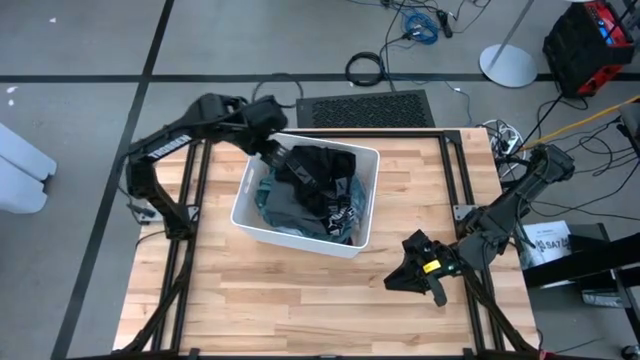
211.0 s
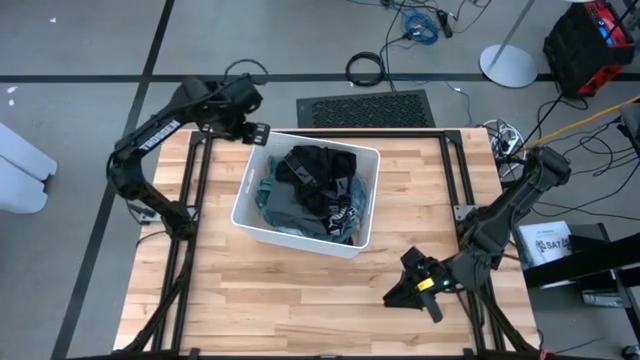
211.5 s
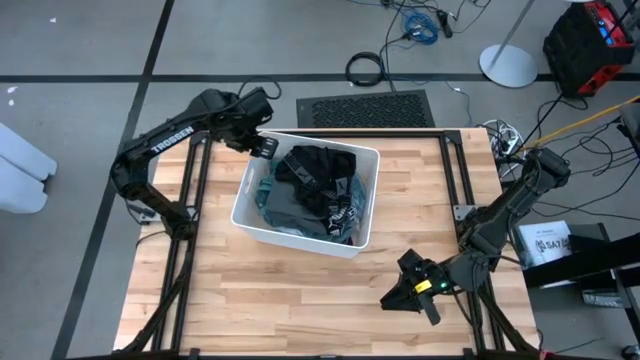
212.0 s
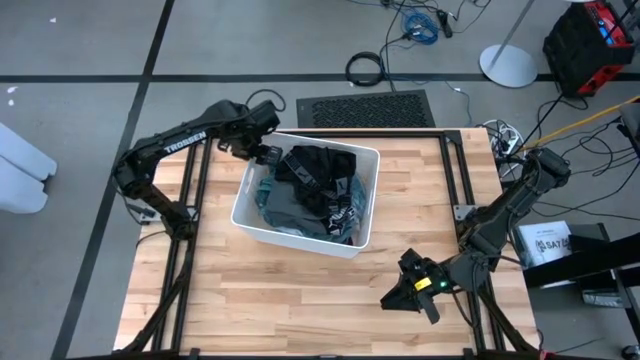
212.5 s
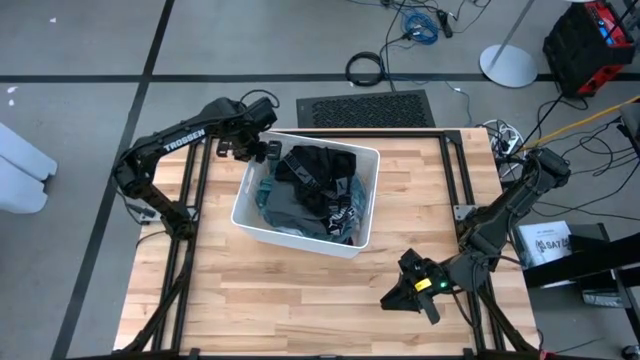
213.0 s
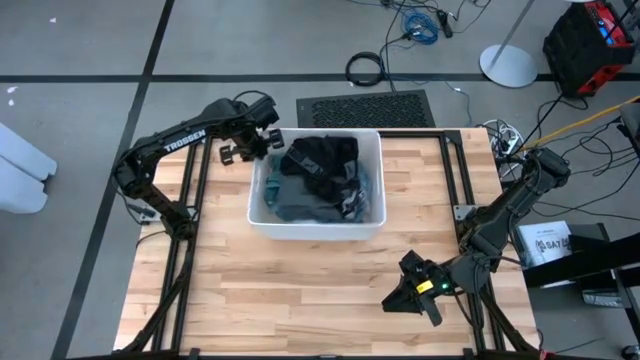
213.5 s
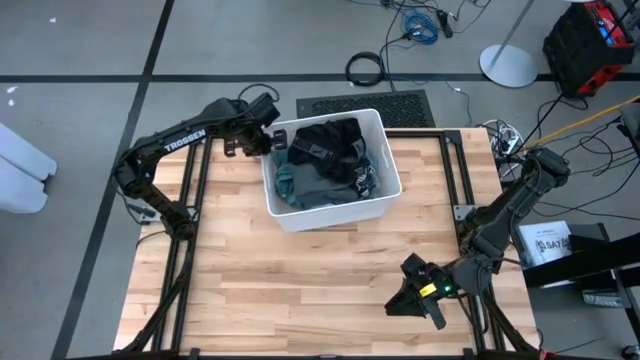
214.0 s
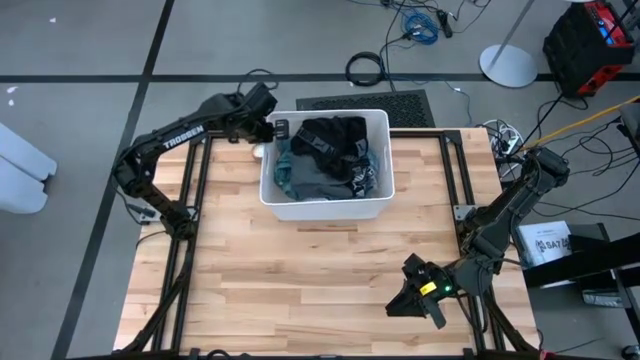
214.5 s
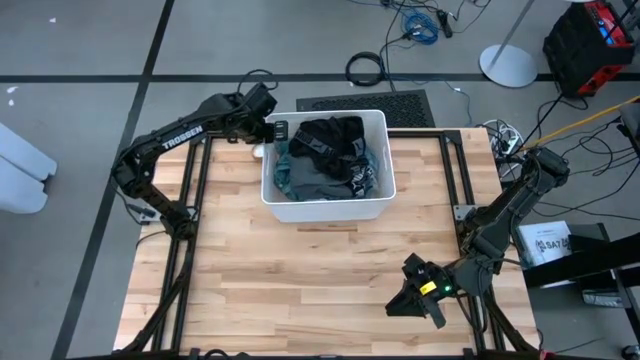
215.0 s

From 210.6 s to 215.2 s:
Task: Sort clothes
Adjust the white laundry bin

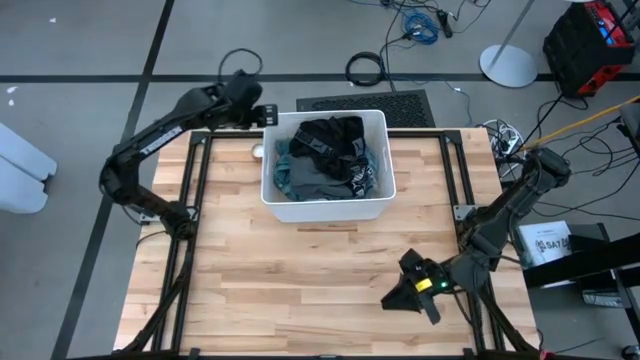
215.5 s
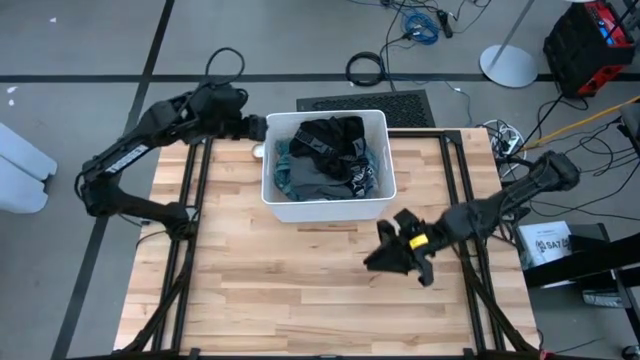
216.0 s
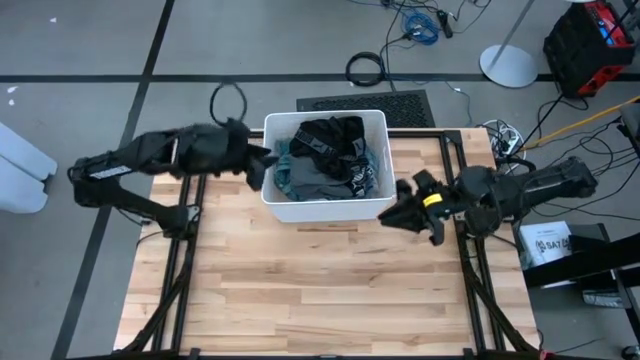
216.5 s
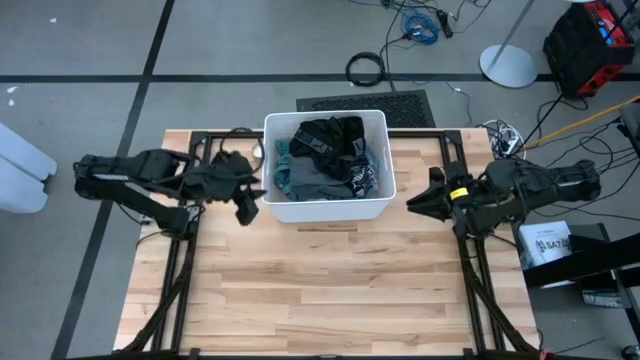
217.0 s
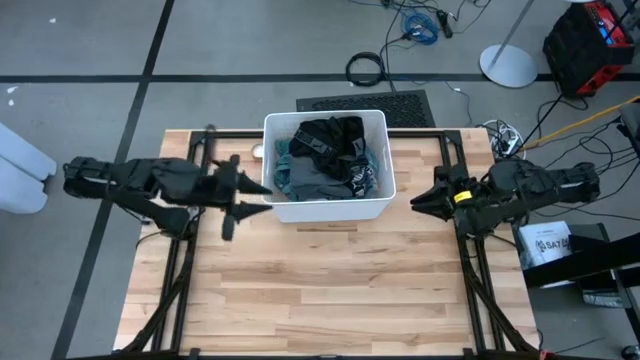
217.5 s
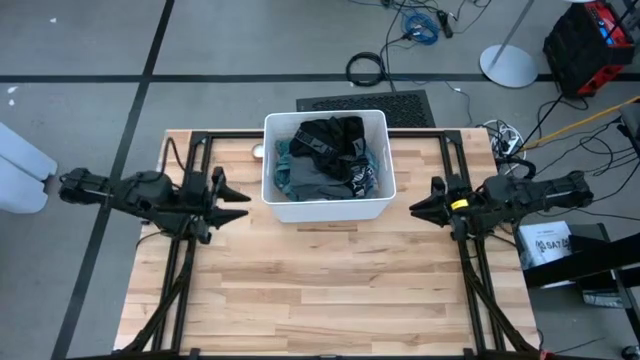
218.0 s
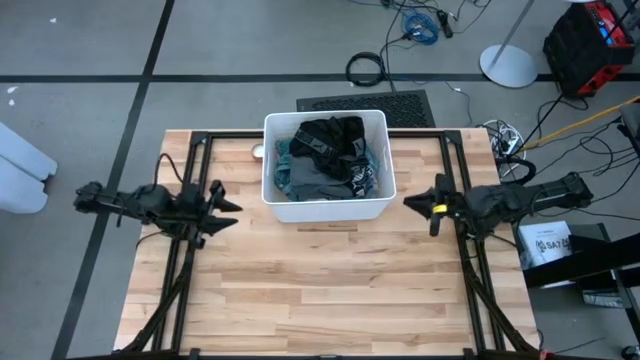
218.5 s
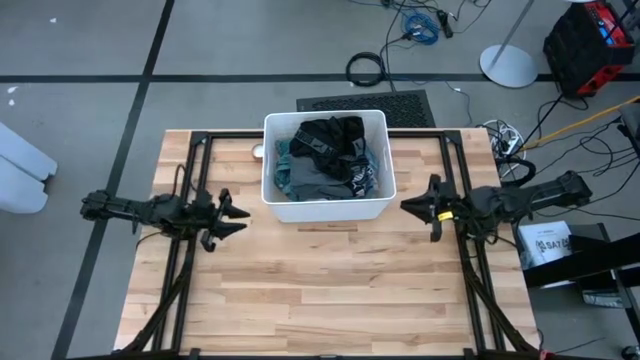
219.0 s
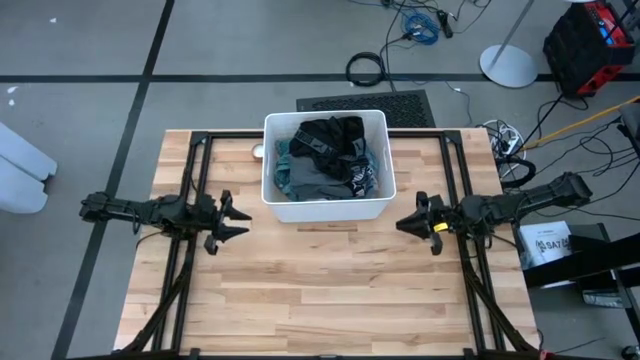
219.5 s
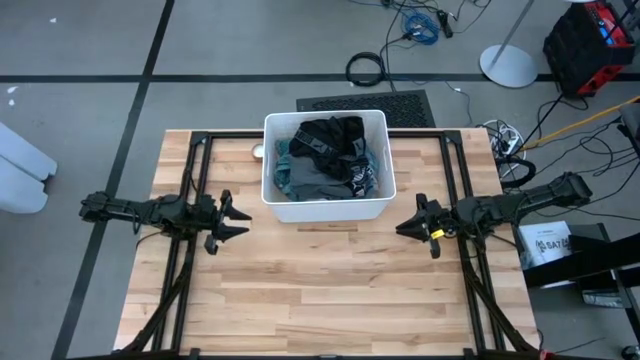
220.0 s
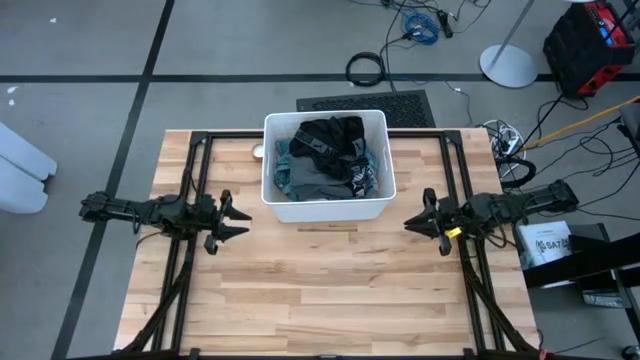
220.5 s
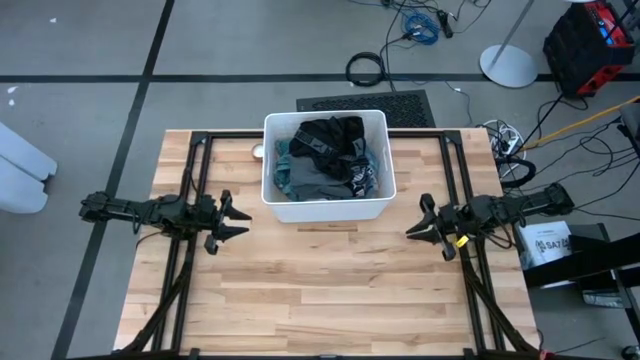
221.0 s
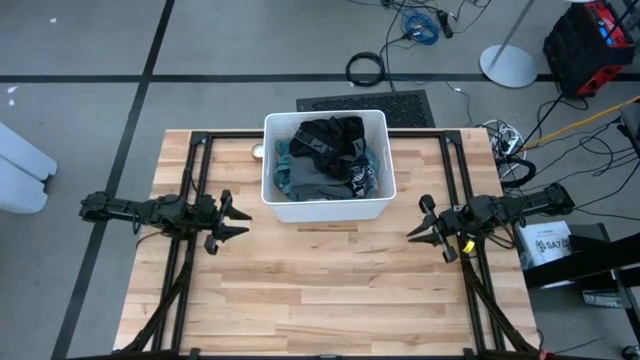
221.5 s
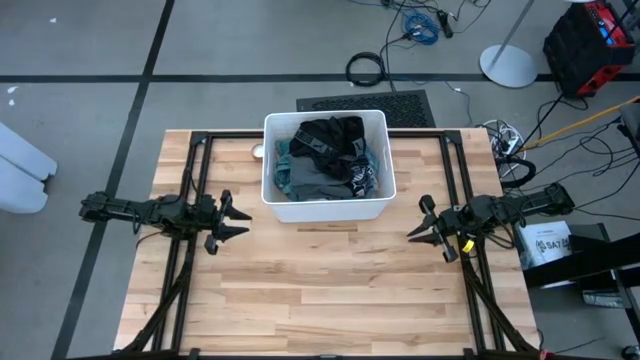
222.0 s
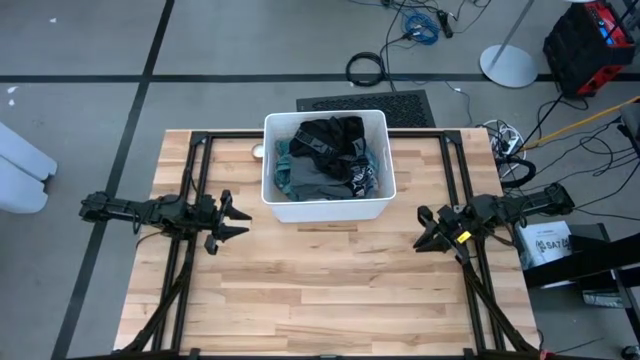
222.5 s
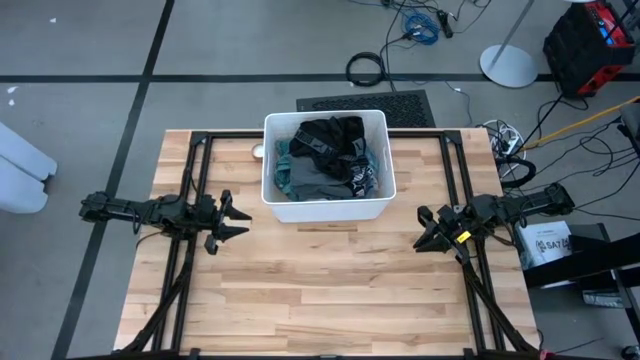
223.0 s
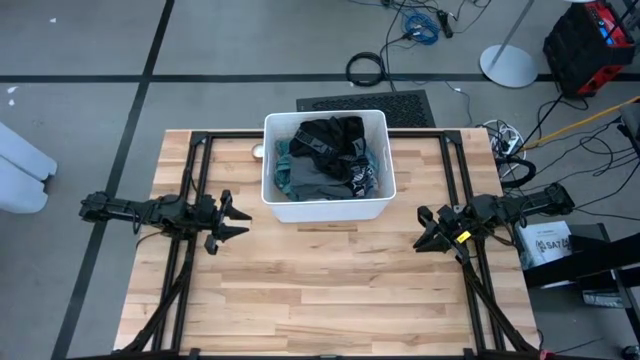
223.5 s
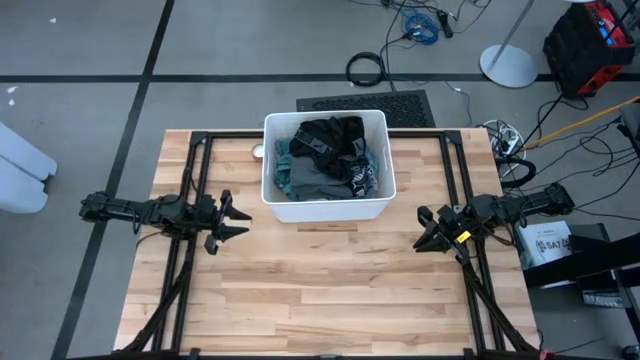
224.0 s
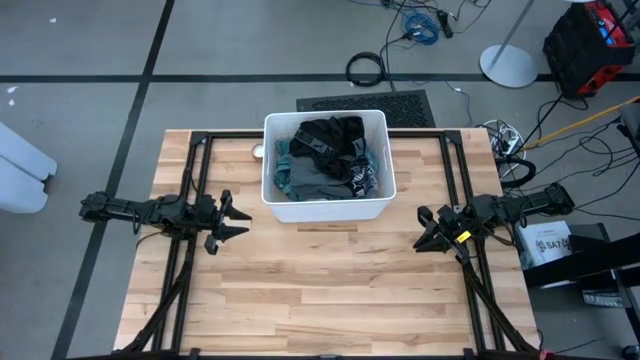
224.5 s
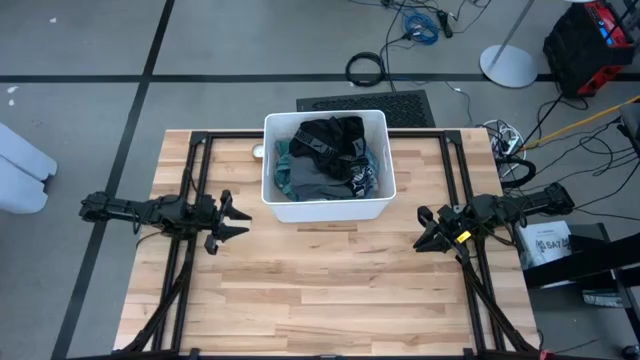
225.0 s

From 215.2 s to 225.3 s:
Return to Home Position

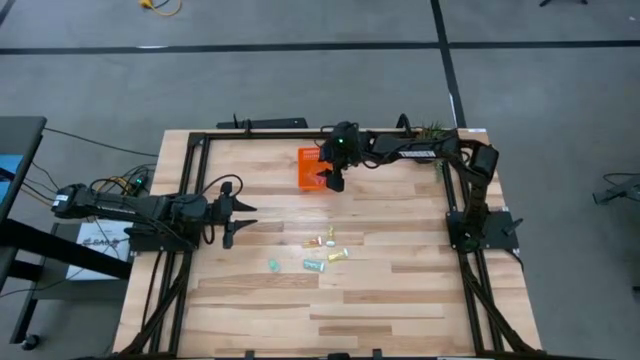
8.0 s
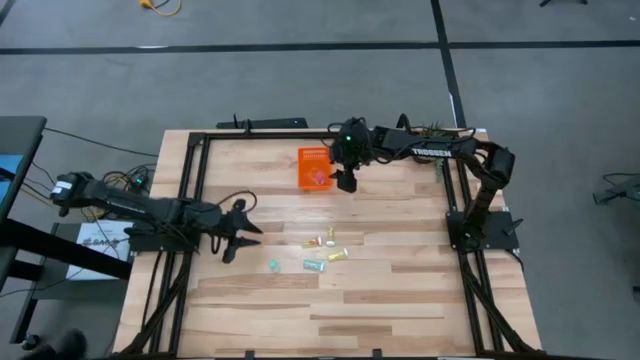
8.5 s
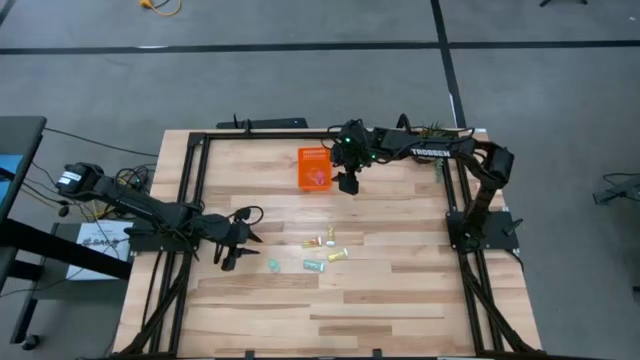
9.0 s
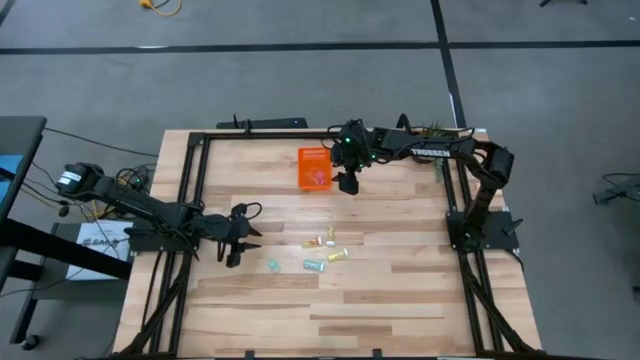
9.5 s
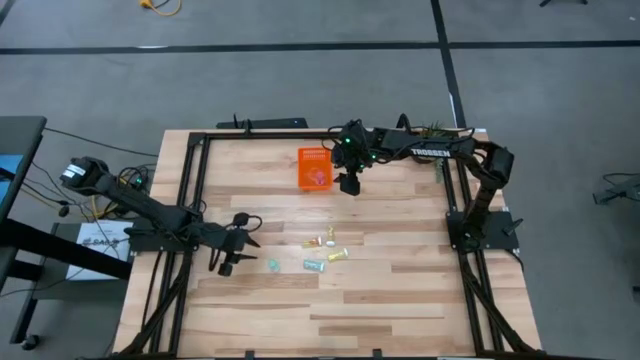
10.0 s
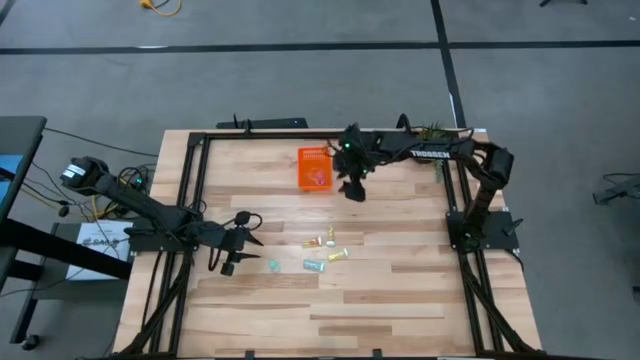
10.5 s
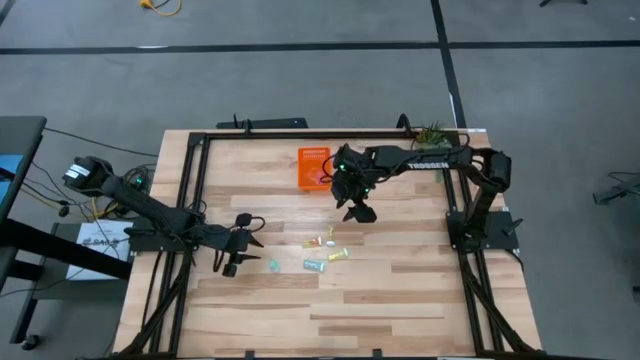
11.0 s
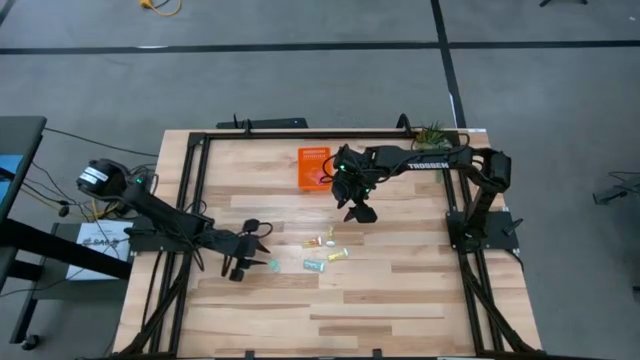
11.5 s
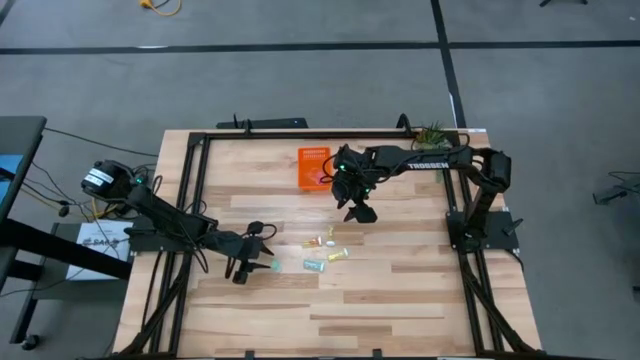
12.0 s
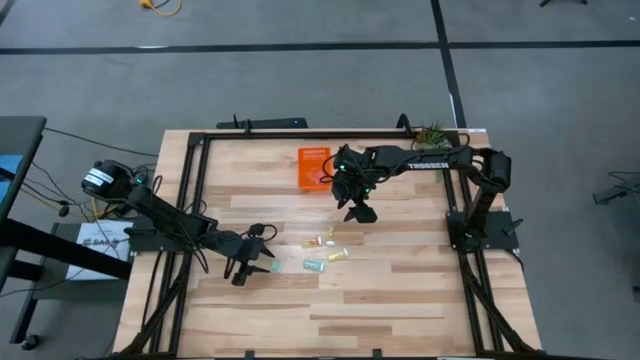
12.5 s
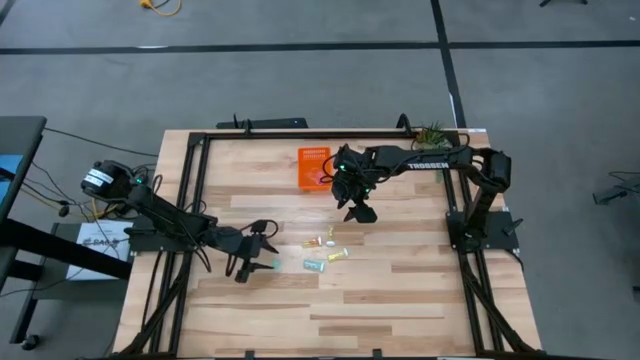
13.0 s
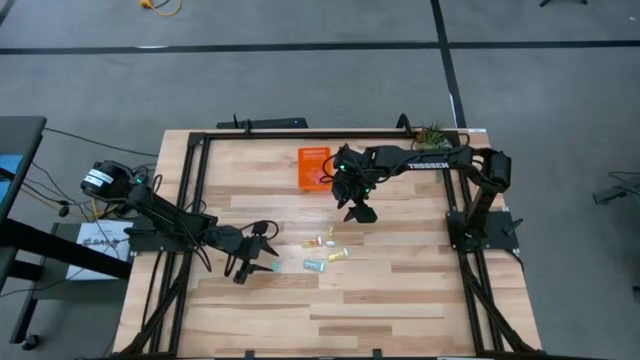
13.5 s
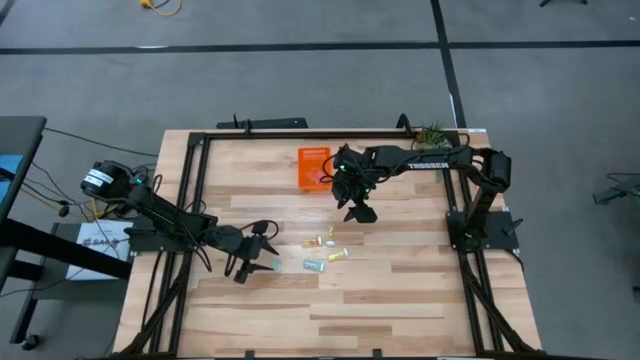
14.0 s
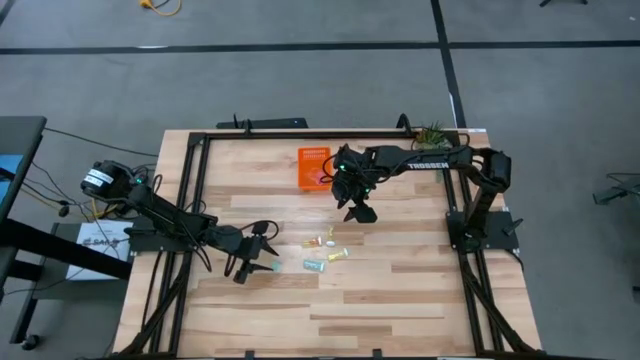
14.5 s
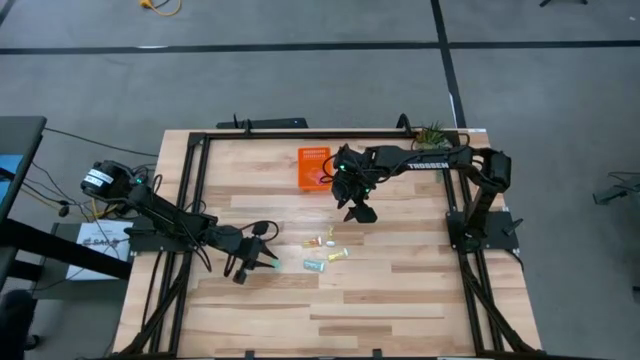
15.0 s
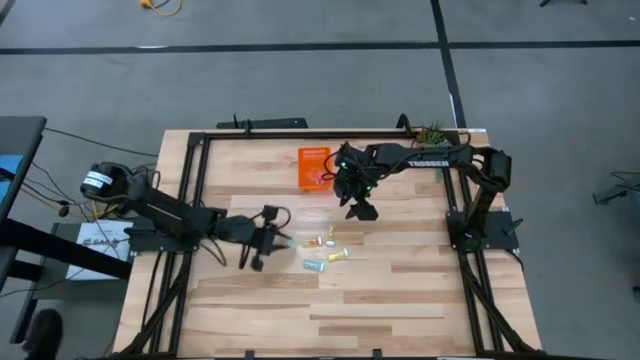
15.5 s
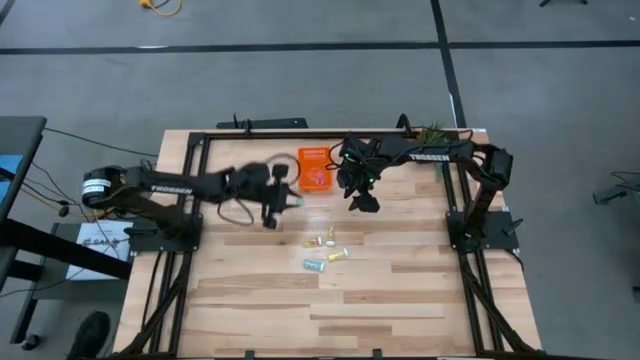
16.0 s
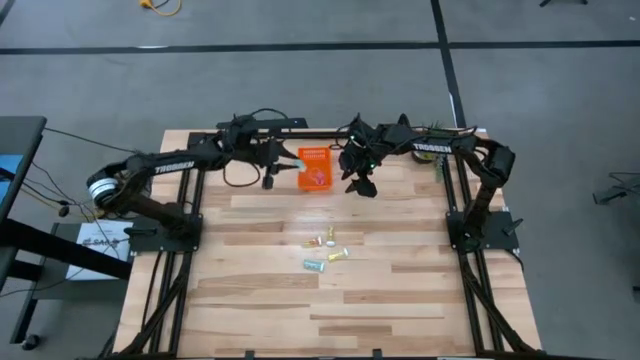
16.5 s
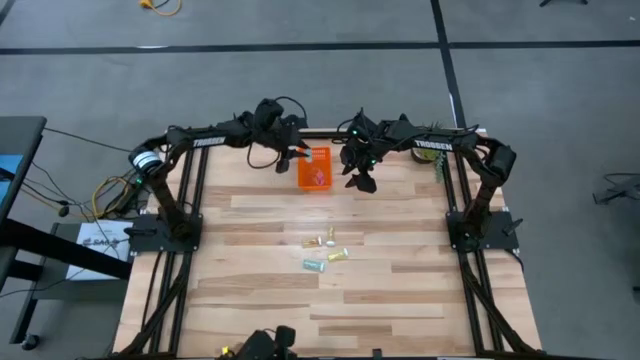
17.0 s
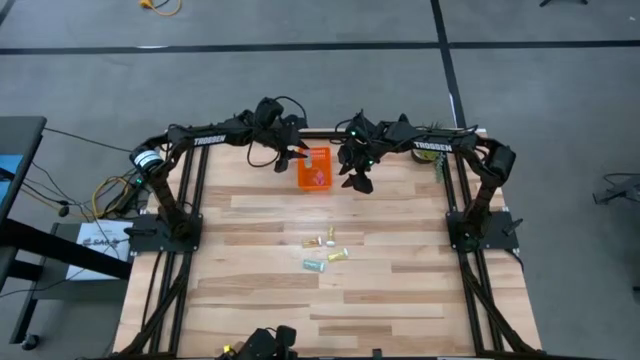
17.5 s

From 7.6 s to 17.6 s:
Task: Pick and place pill bottles into a basket
Put the blue pill bottle into the orange bin
